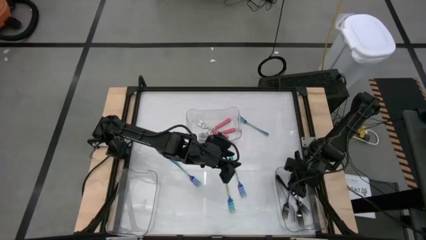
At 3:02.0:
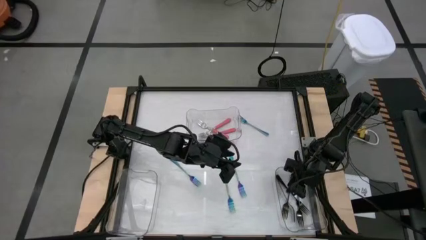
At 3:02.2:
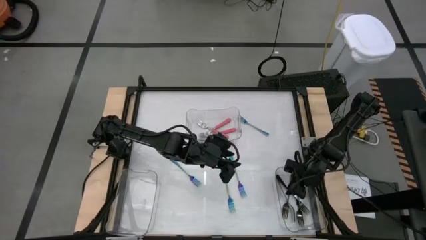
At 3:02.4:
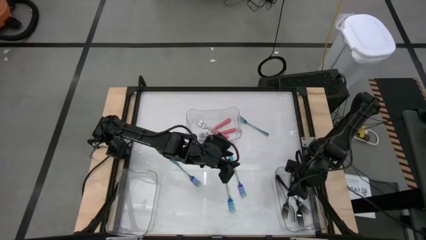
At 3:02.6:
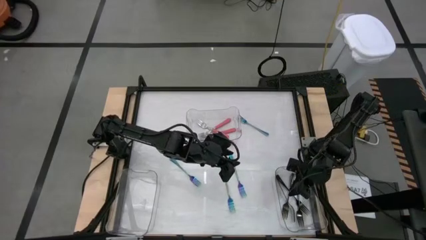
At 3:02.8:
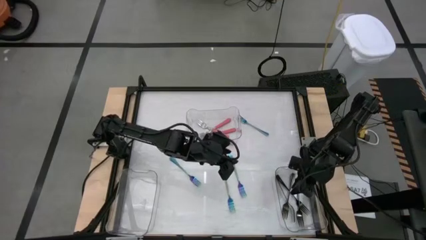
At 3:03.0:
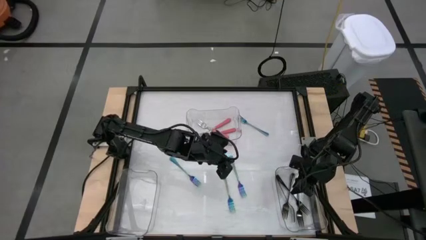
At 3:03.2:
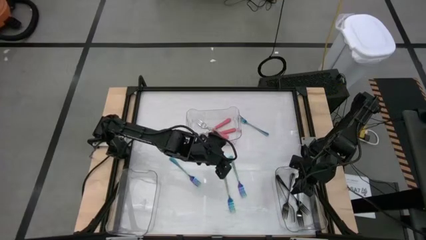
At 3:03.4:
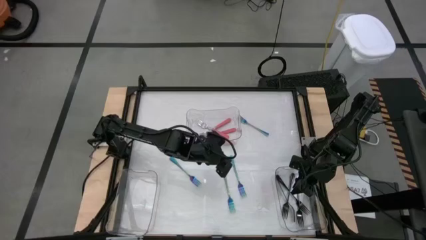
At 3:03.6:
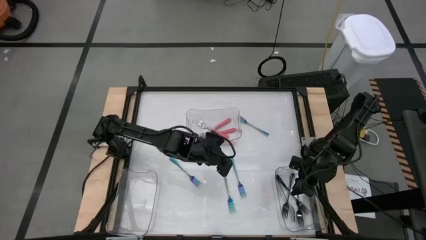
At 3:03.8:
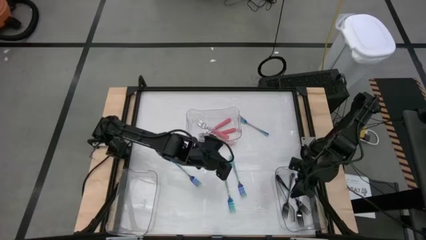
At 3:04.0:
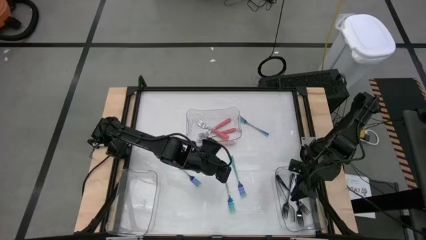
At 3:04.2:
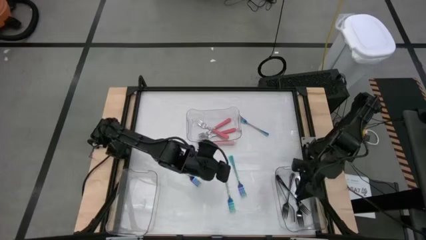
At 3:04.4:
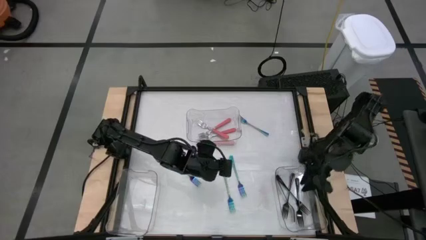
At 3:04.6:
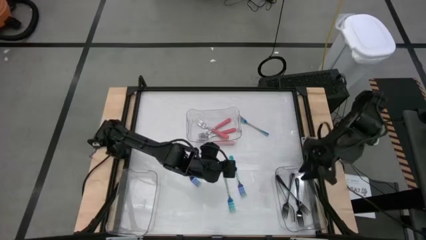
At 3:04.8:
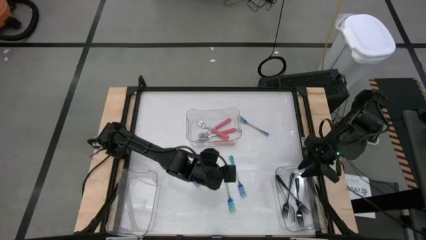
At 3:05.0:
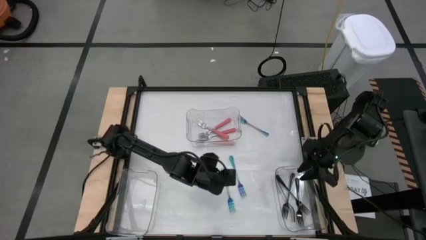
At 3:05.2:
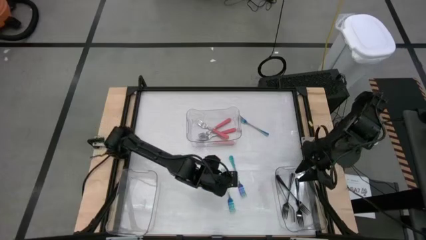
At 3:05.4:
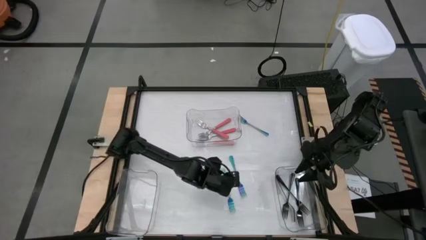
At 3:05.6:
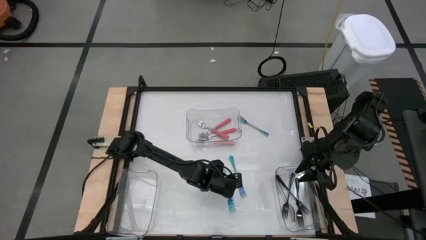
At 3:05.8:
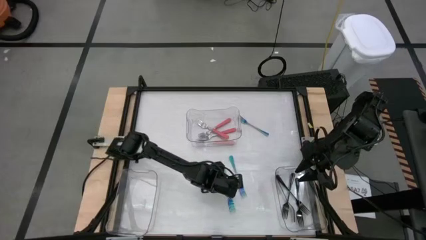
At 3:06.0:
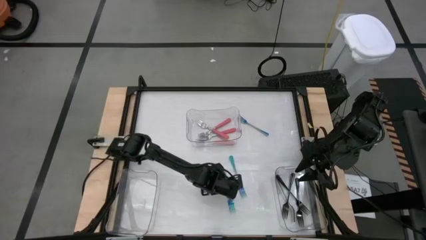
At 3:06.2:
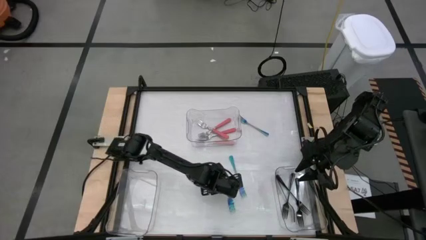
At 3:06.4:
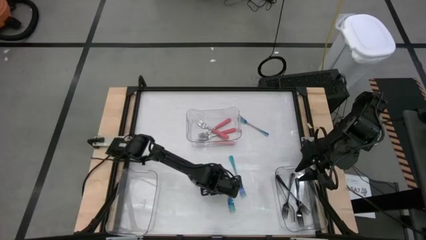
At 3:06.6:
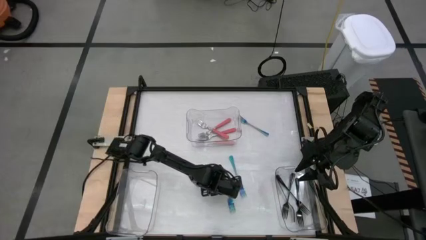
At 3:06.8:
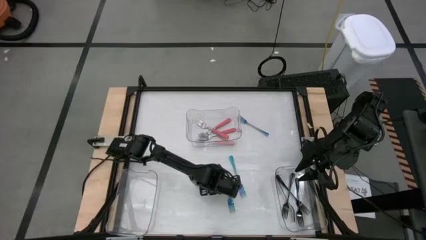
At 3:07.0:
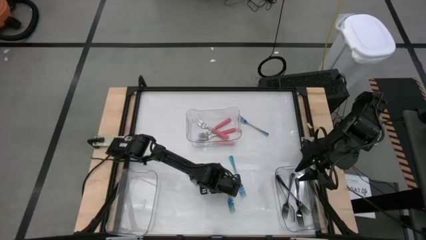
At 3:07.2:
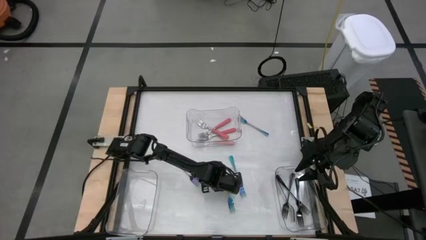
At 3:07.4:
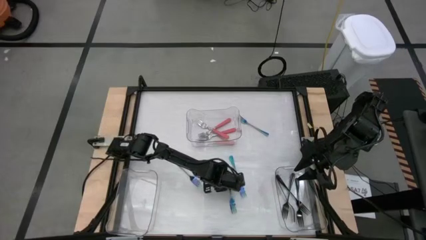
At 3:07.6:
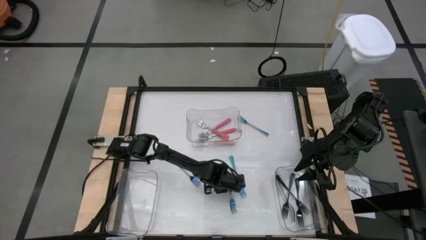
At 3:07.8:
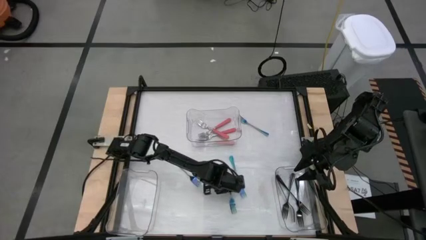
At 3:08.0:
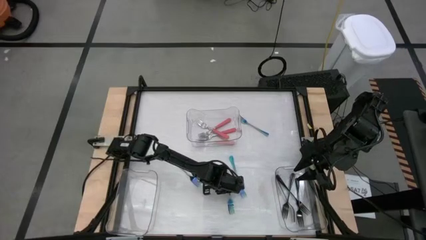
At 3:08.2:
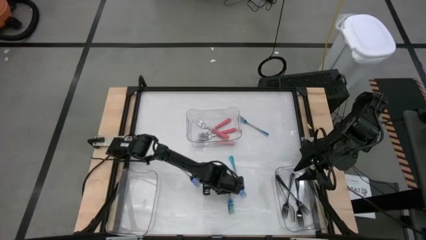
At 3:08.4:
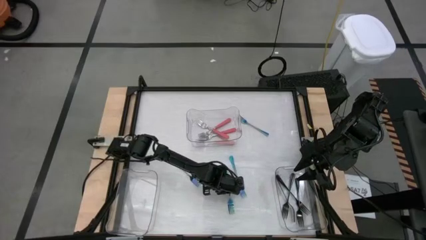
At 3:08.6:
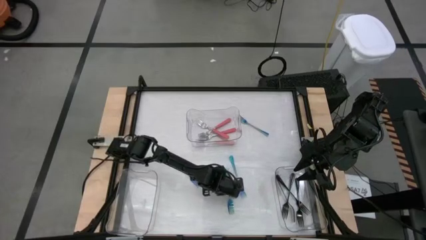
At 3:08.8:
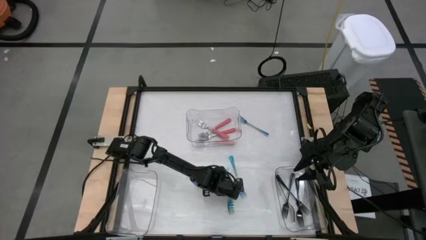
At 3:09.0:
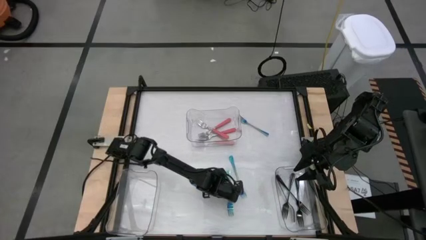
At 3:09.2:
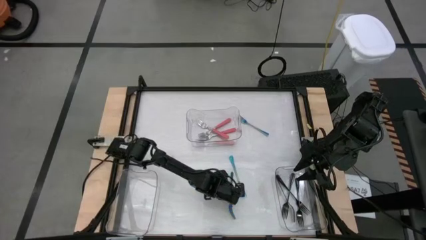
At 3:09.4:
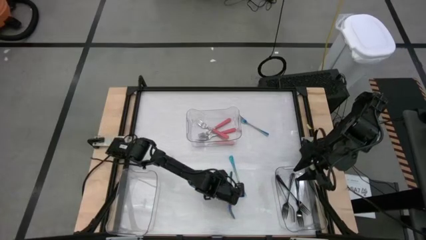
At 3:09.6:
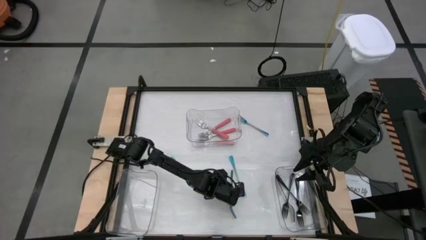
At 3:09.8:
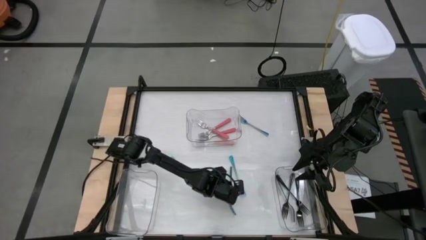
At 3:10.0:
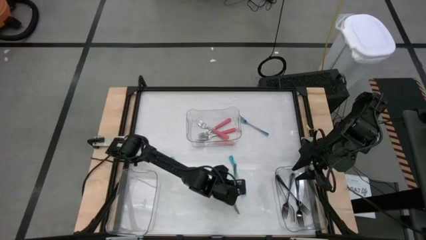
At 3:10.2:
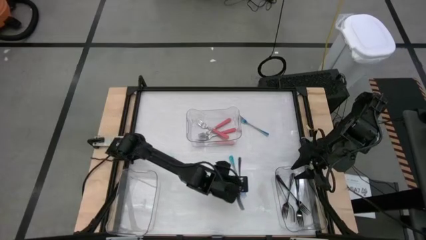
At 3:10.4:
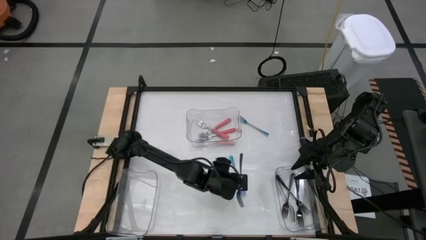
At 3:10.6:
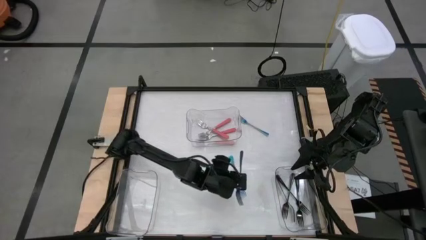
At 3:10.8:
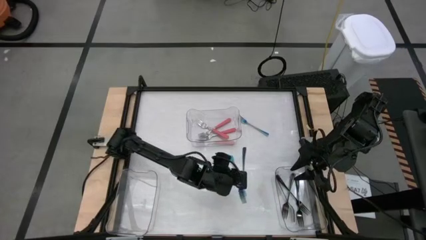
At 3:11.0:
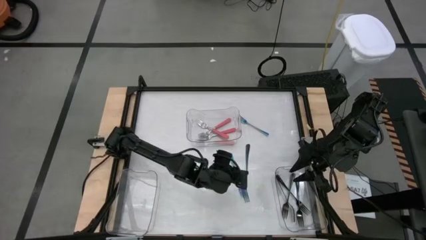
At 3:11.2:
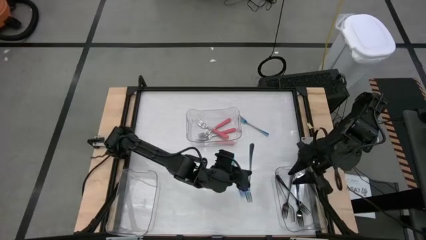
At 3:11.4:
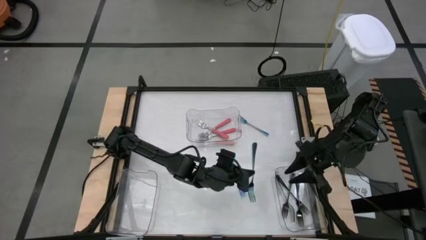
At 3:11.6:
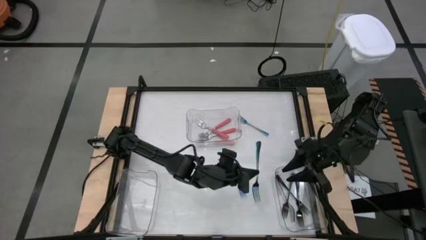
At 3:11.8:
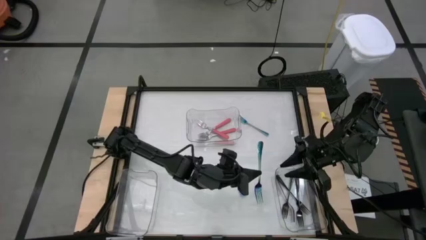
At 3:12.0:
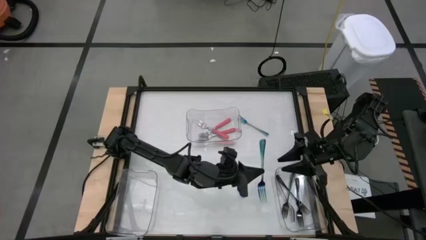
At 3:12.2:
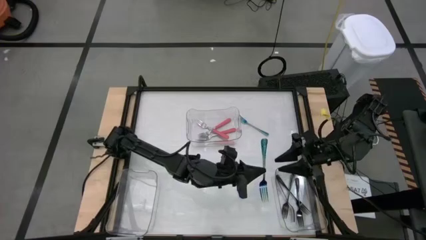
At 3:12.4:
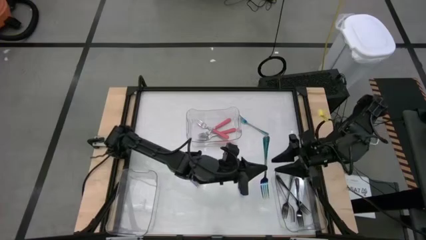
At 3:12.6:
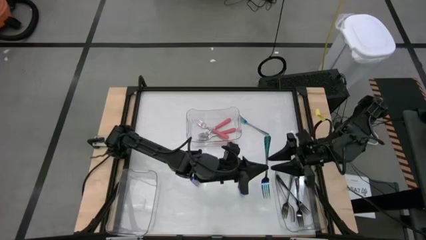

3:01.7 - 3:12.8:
Task: Sort silverware by color (type)
Put the blue fork into the left transparent bin
